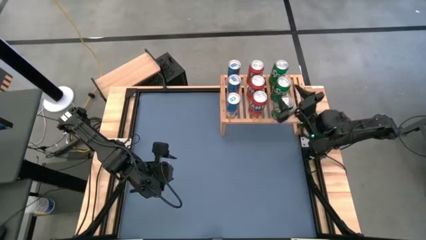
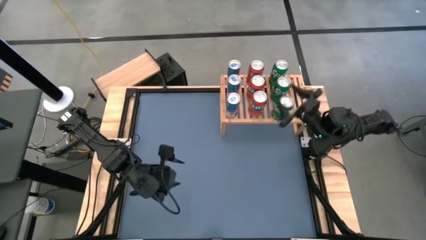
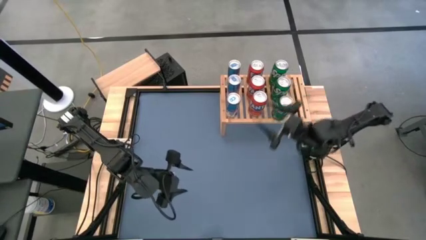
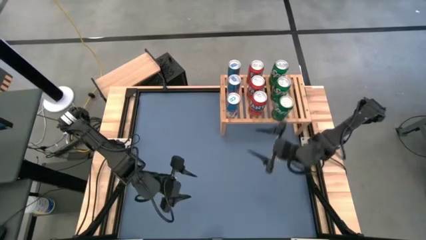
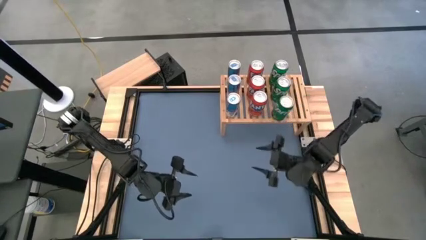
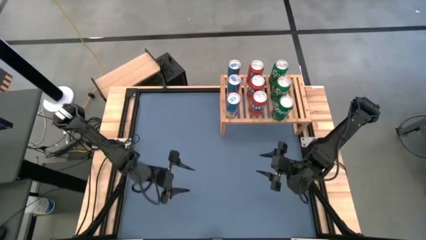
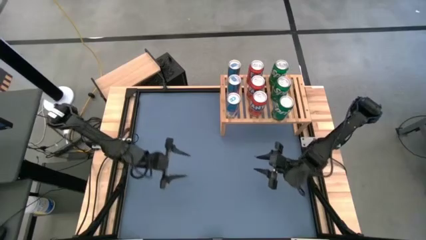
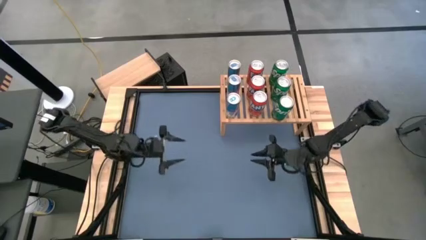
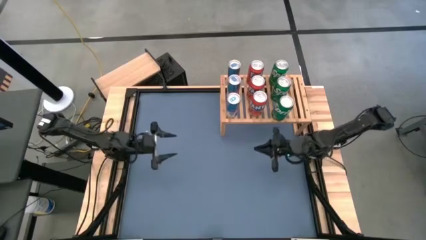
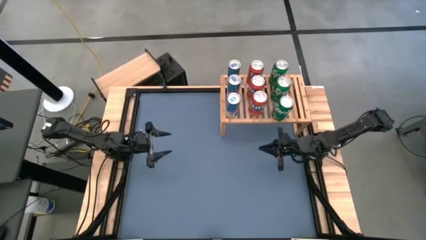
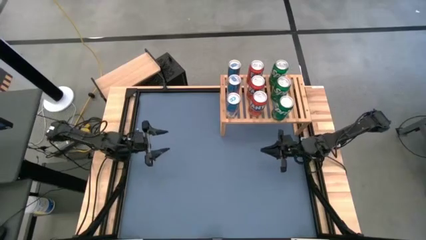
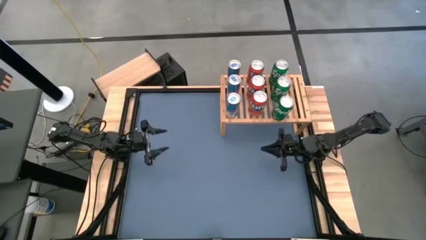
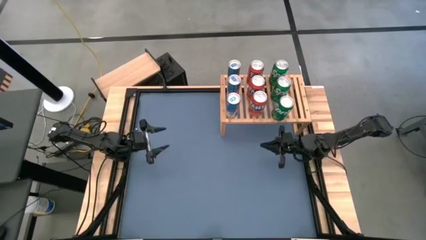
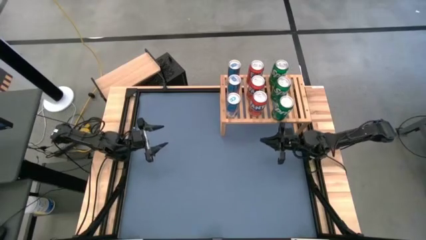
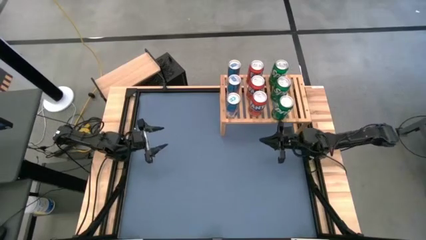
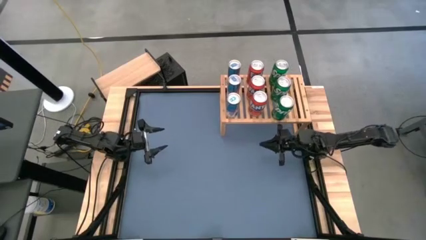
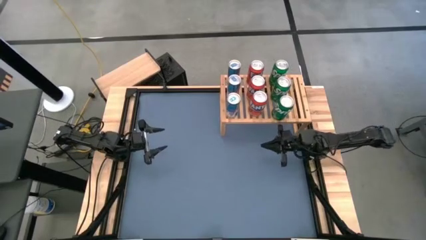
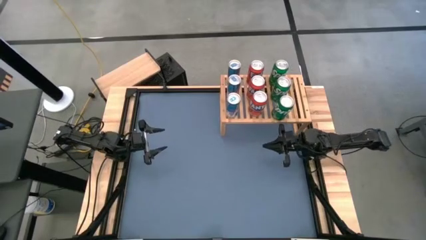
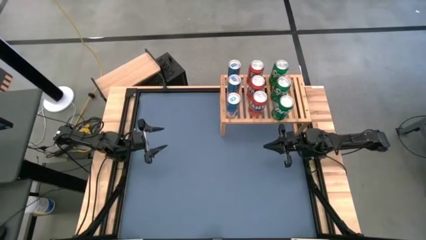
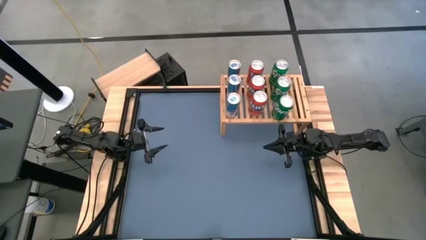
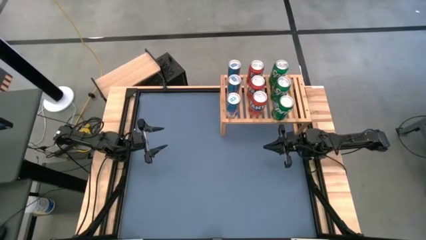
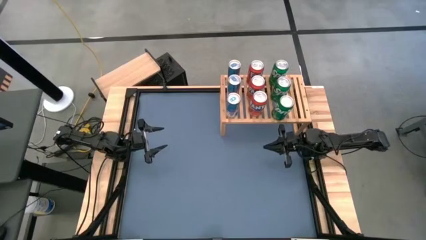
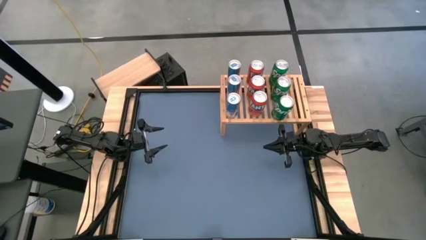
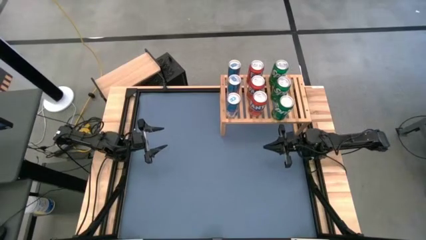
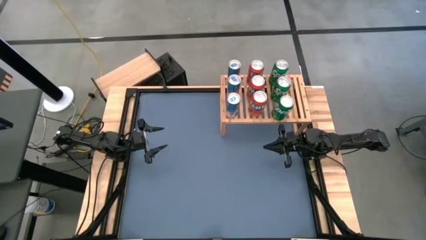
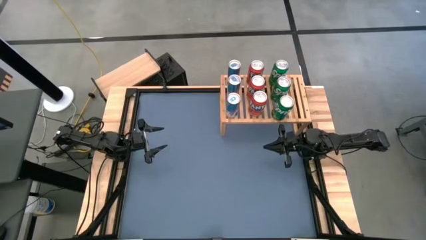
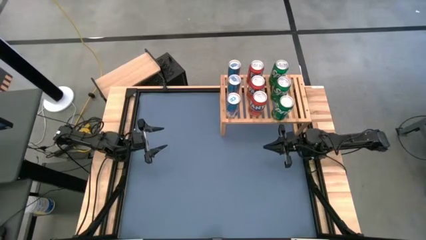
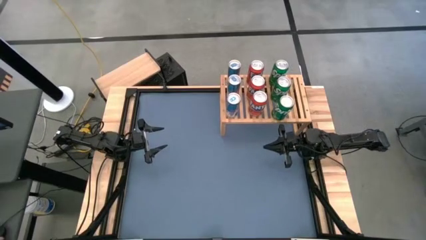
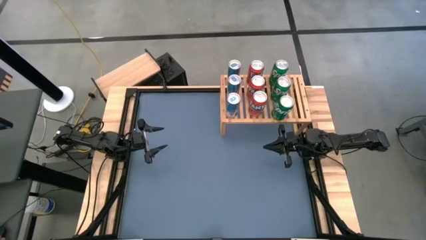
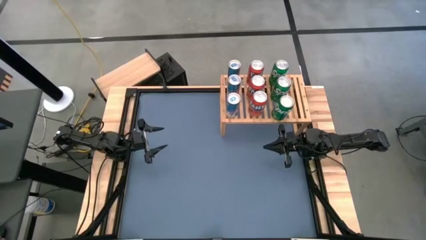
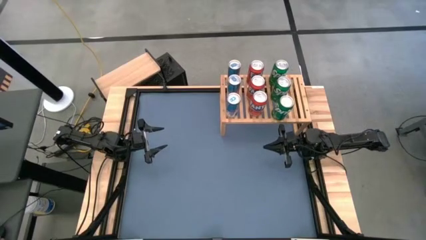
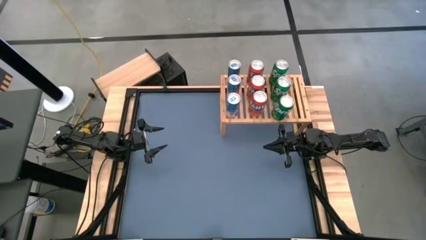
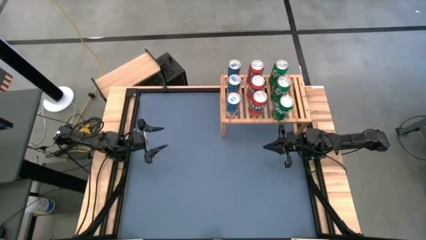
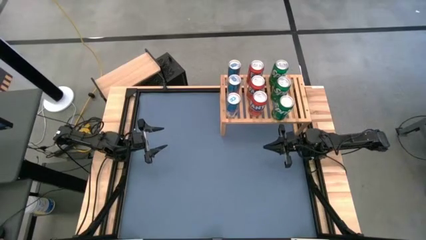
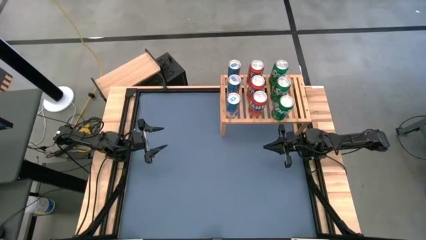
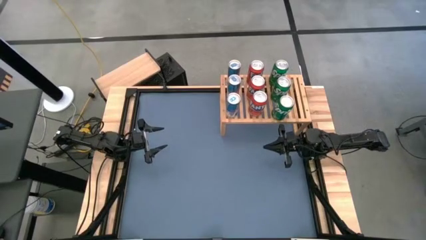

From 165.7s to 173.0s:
Task: Place canned beverage on shelf
Return to Home Position
